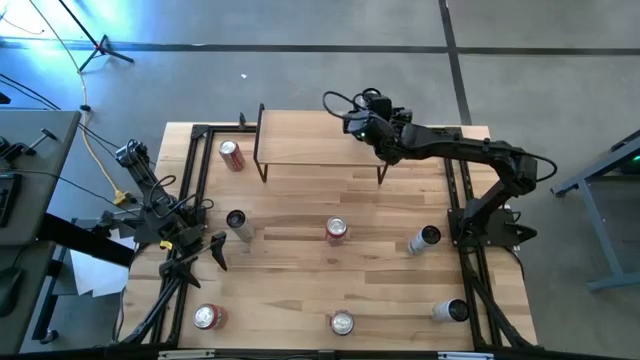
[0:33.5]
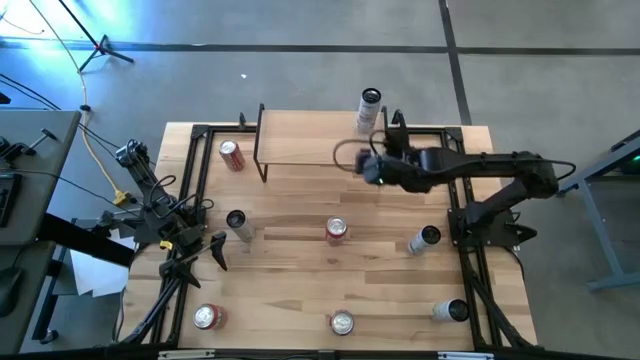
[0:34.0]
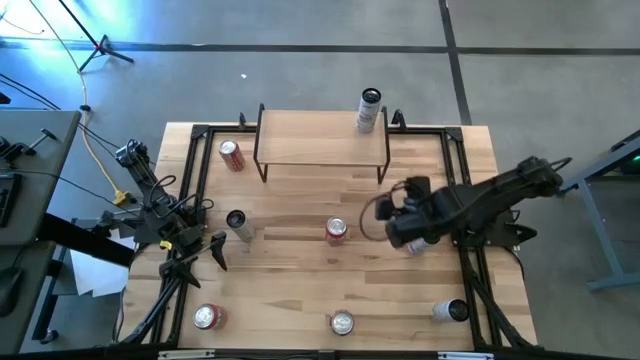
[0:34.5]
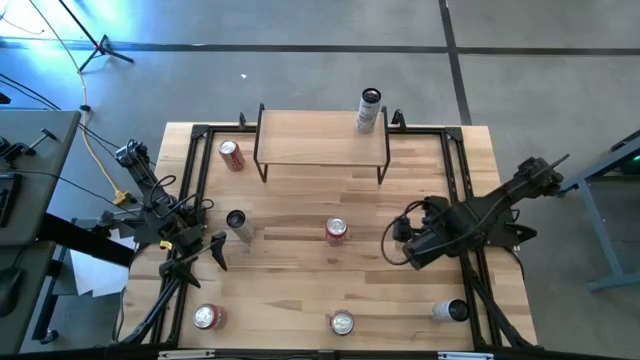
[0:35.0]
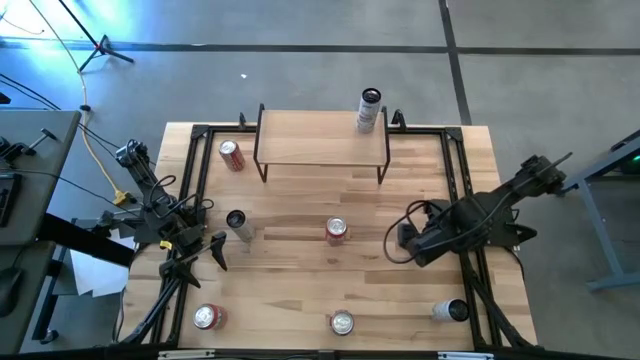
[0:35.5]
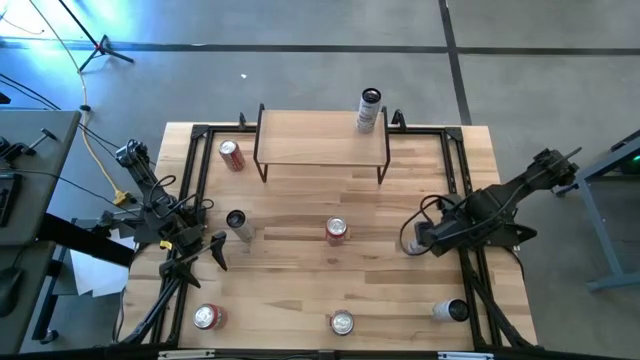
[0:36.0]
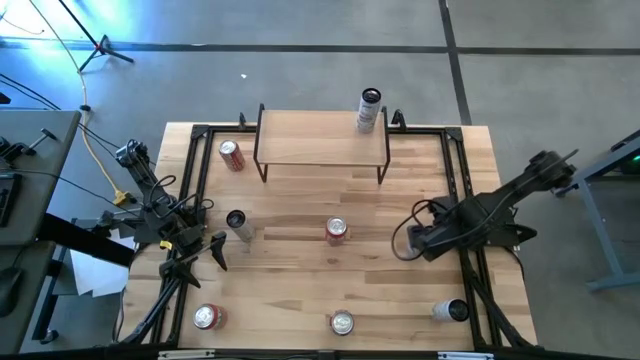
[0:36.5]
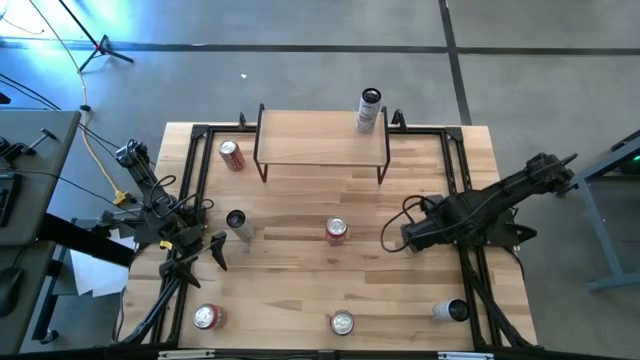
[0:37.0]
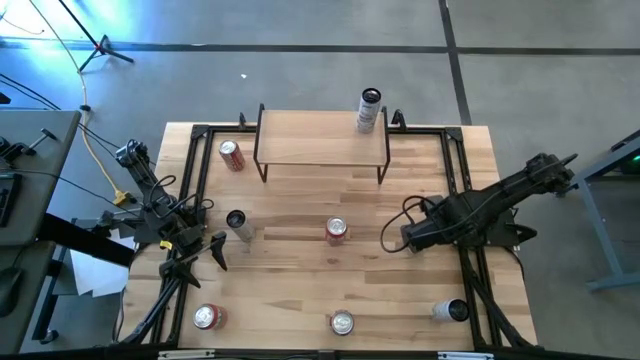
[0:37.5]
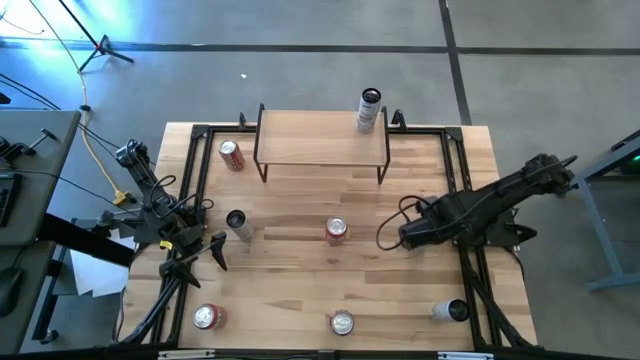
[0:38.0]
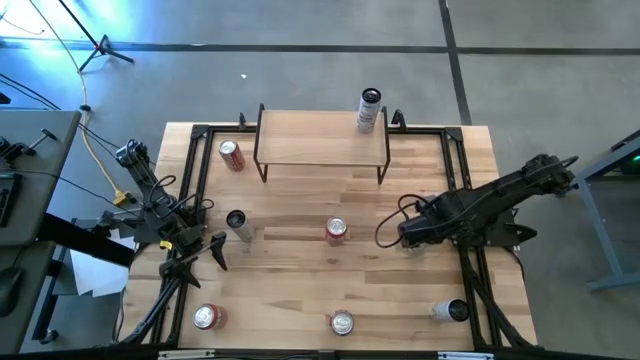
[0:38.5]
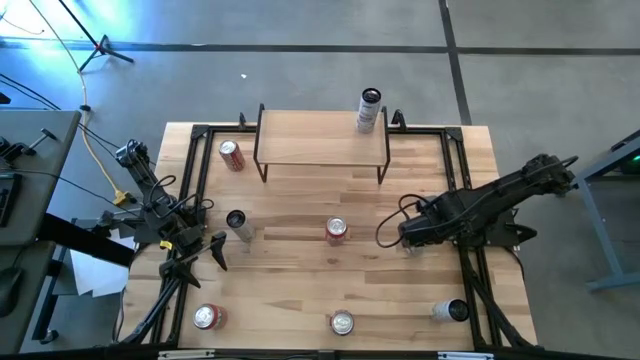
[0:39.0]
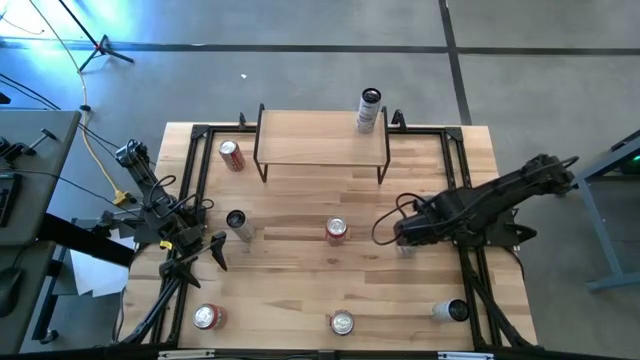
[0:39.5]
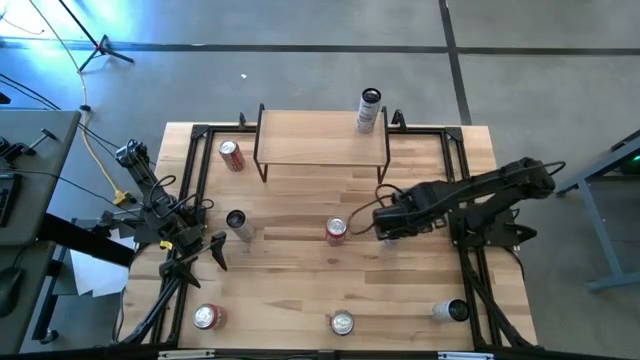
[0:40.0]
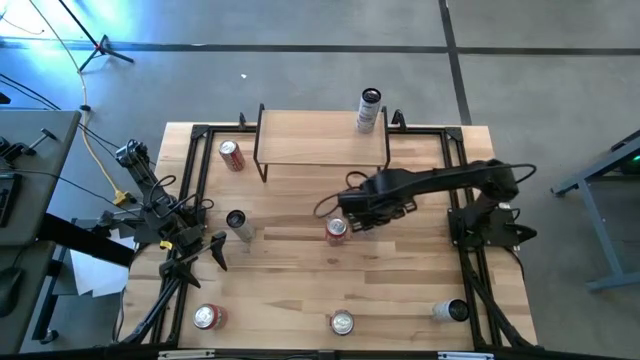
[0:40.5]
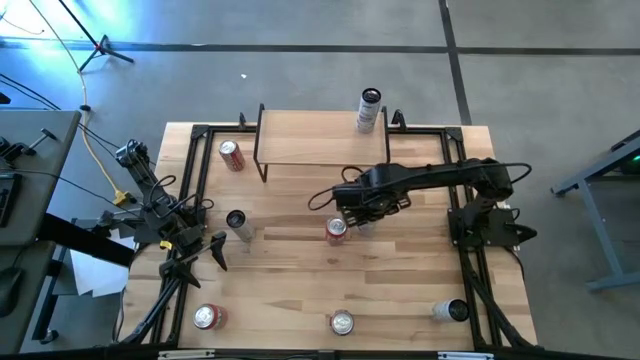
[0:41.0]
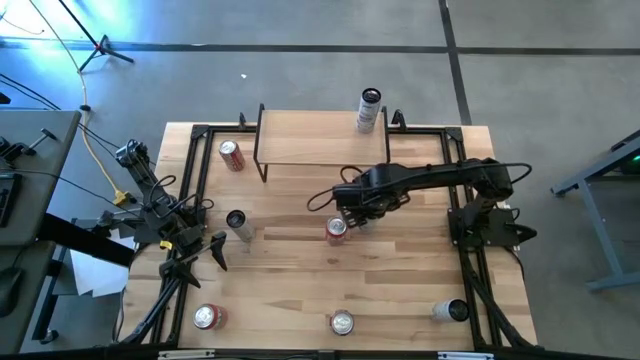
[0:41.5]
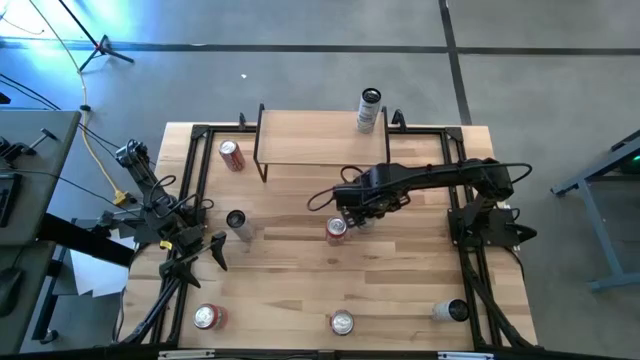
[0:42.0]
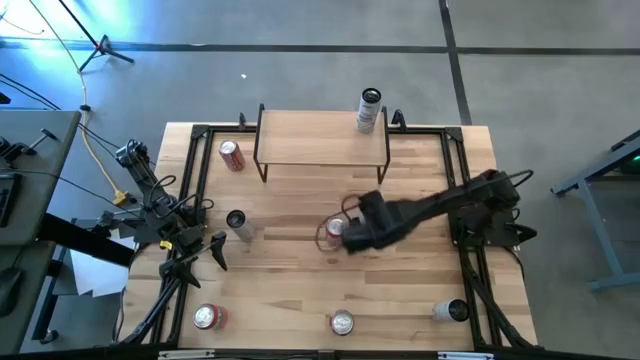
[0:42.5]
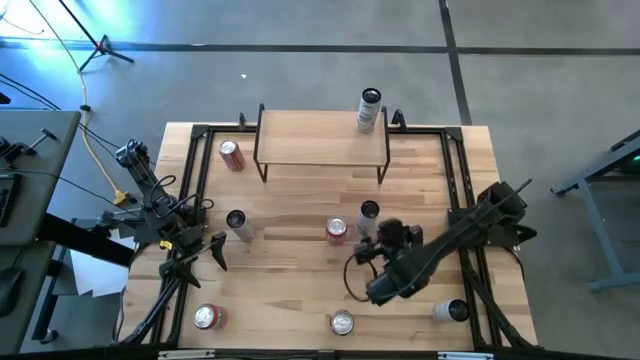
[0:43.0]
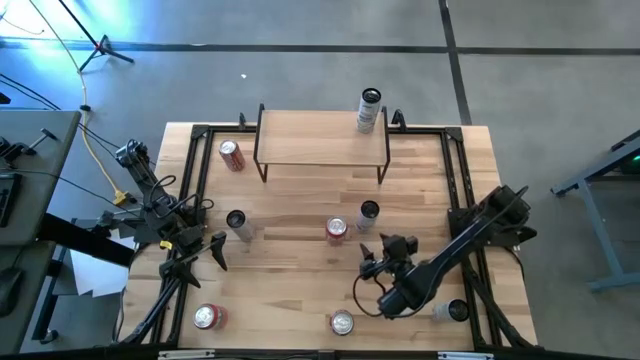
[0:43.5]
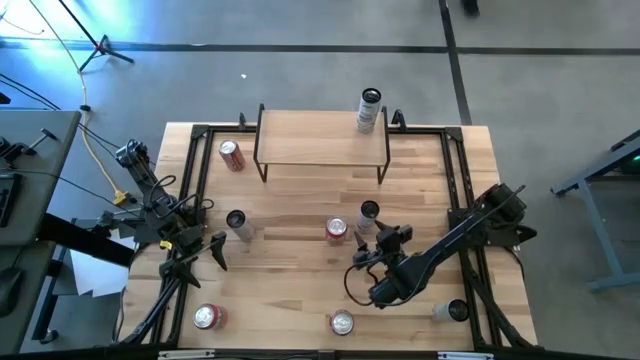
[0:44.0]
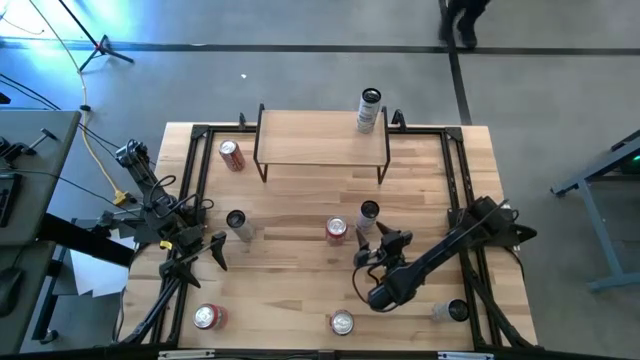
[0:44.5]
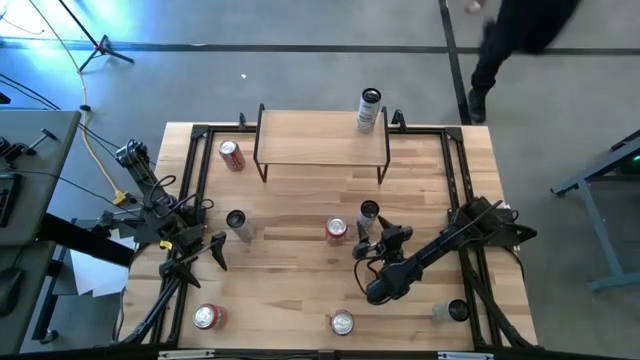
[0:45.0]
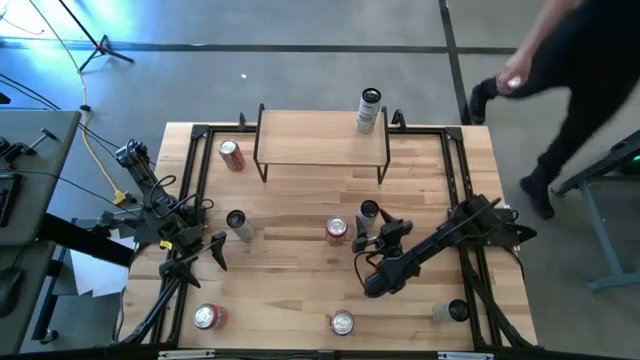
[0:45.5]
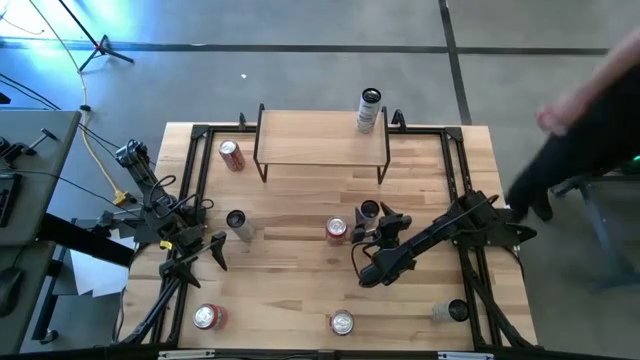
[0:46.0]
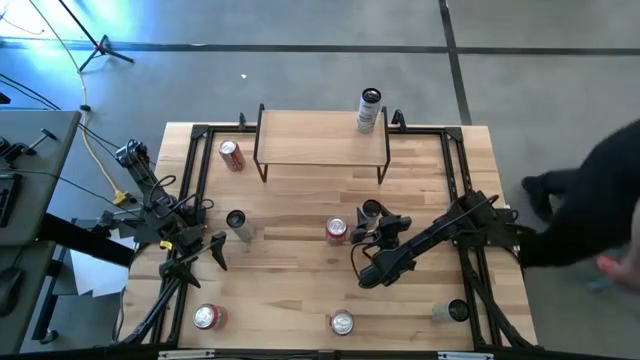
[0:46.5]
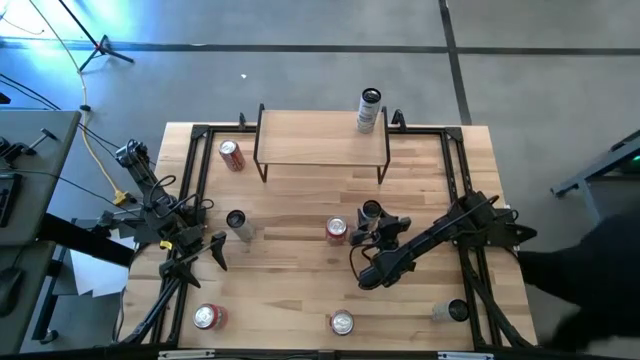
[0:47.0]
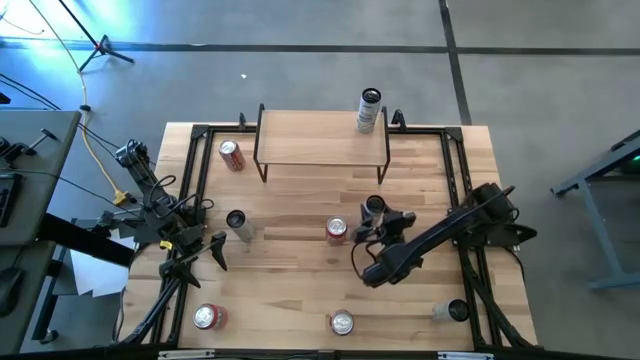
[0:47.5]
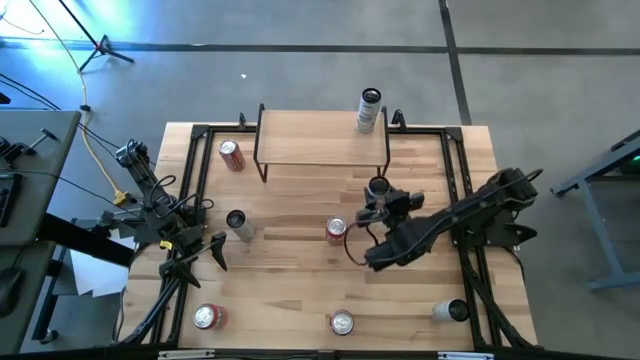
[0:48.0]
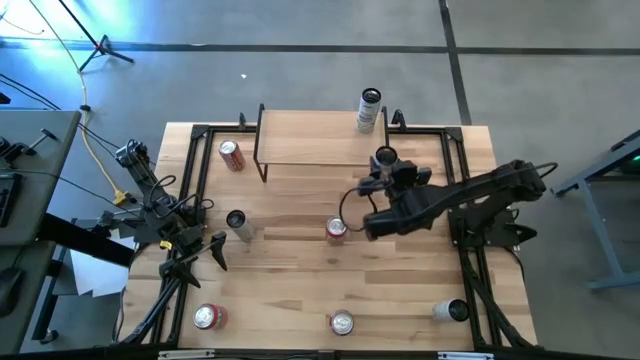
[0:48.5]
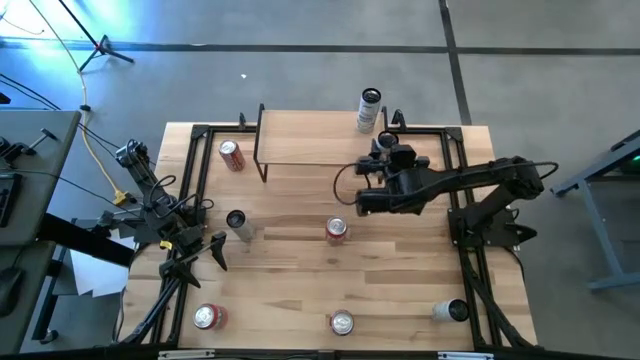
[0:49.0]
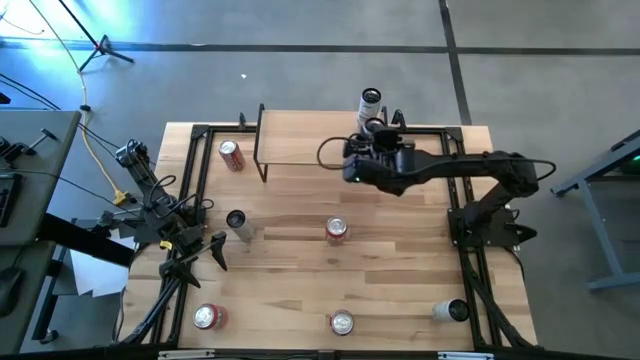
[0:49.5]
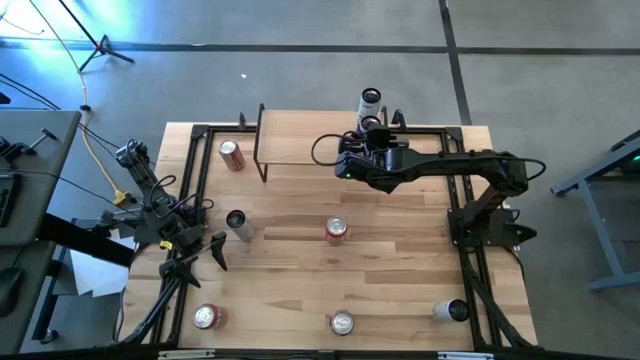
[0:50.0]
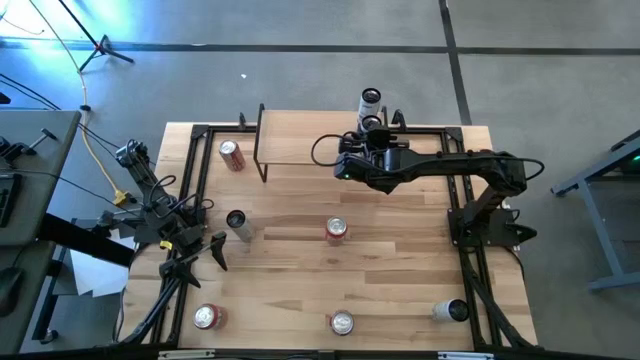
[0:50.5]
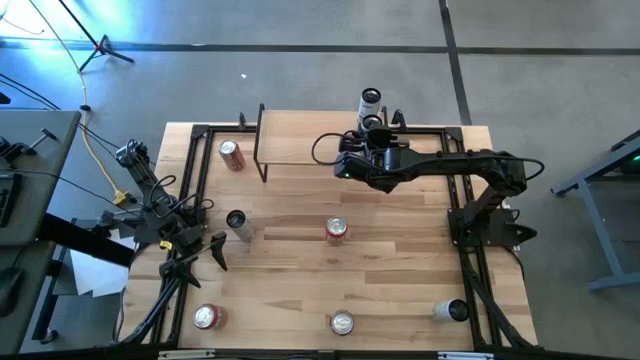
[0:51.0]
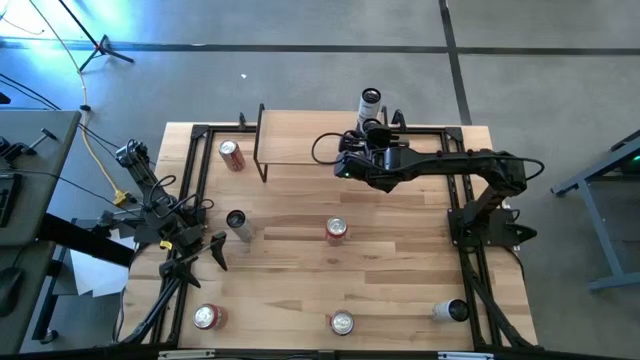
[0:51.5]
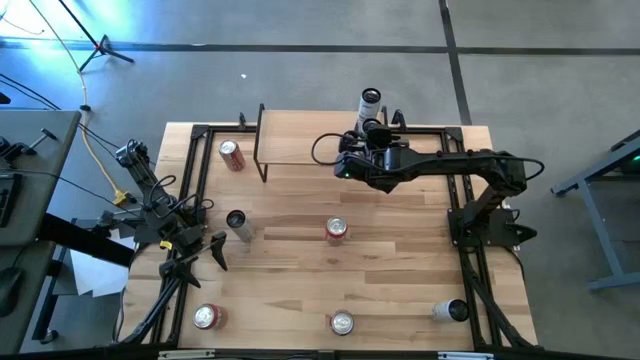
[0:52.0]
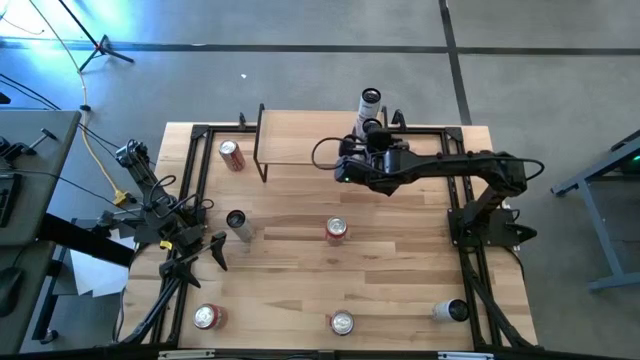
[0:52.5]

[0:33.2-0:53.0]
Task: Place canned beverage on shelf
Put the white blue soda can on the shelf aligned with the white blue soda can
